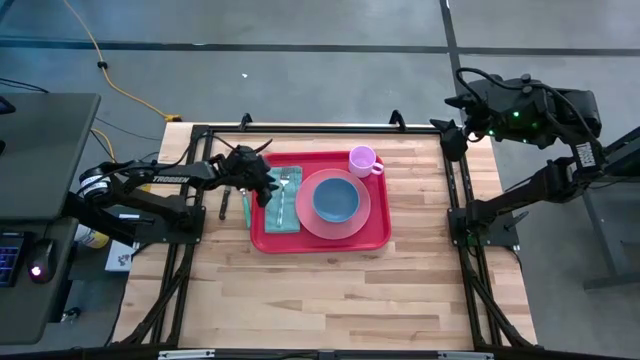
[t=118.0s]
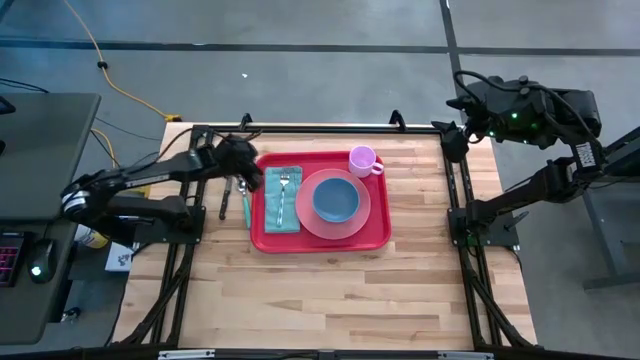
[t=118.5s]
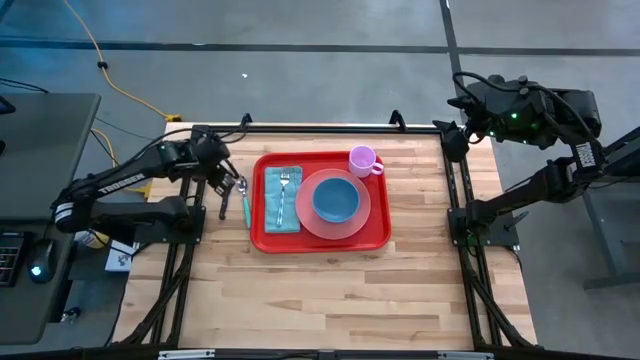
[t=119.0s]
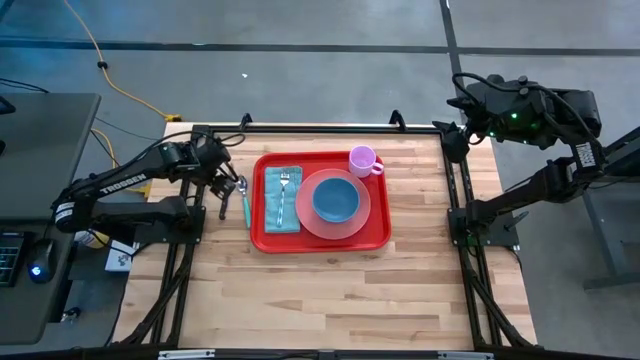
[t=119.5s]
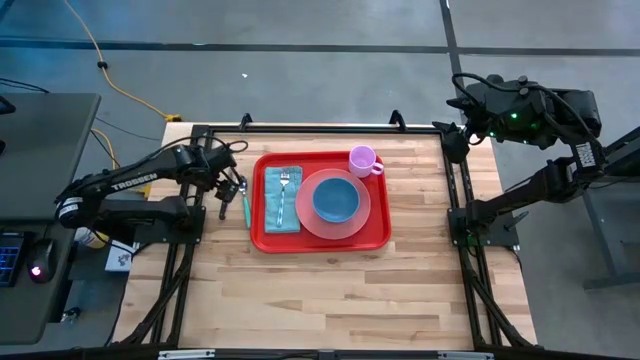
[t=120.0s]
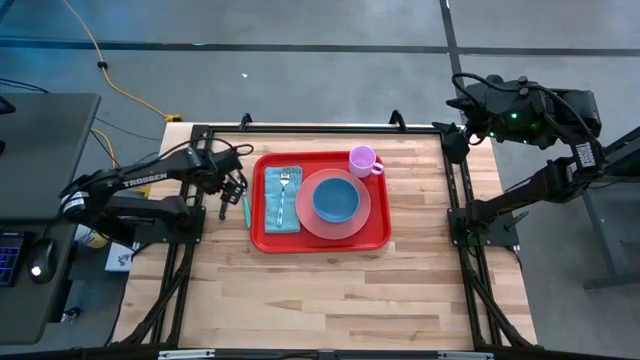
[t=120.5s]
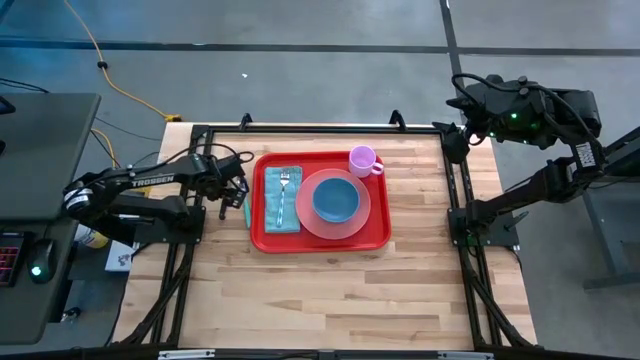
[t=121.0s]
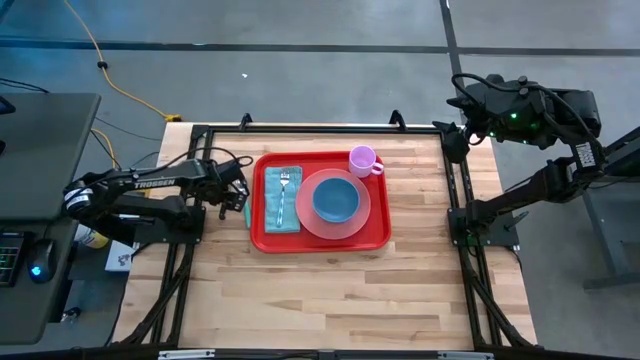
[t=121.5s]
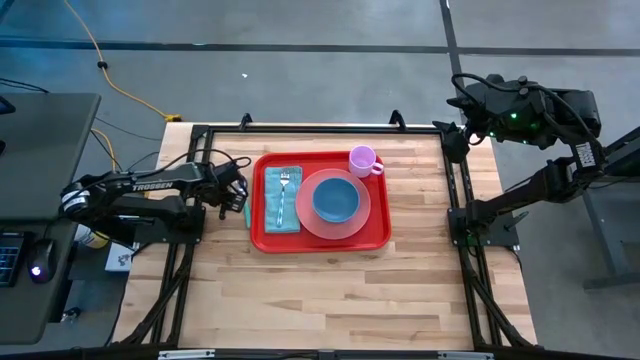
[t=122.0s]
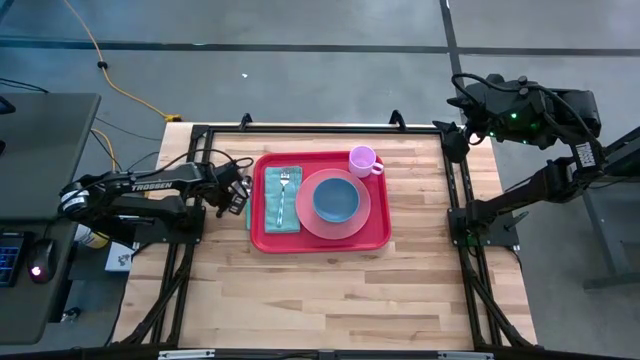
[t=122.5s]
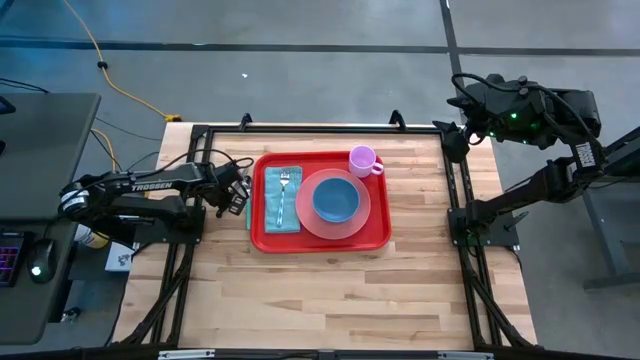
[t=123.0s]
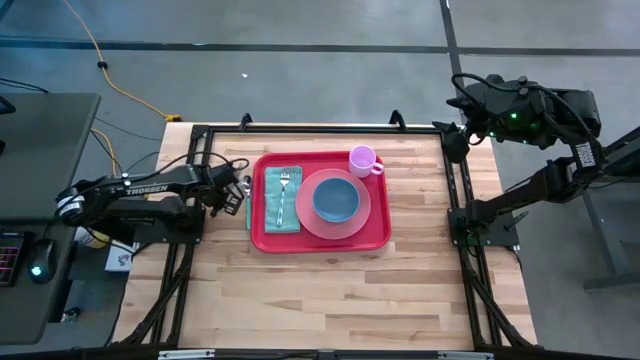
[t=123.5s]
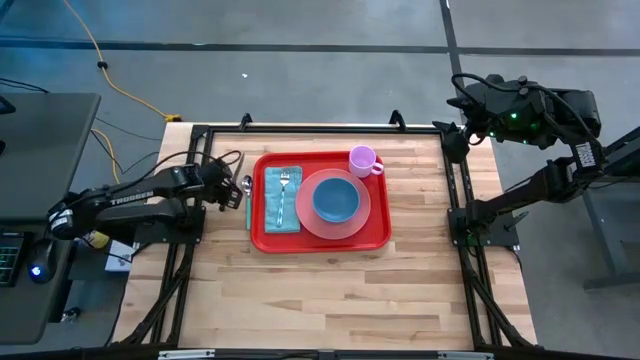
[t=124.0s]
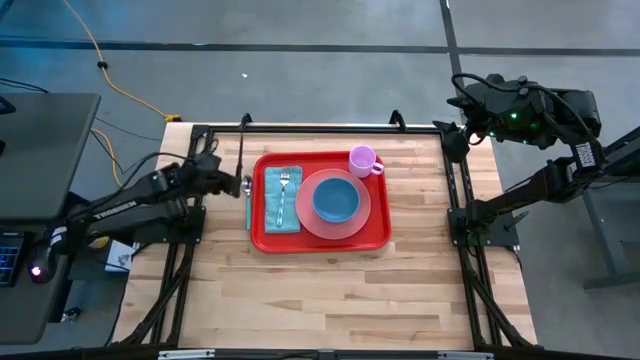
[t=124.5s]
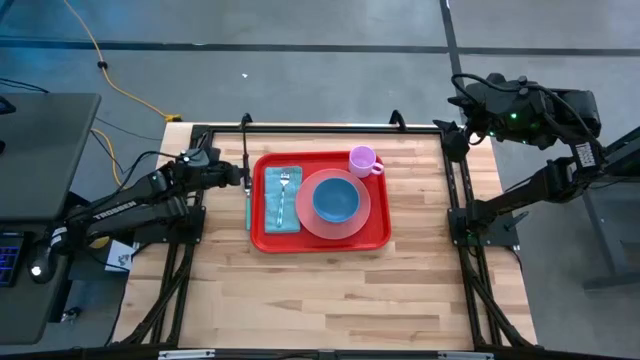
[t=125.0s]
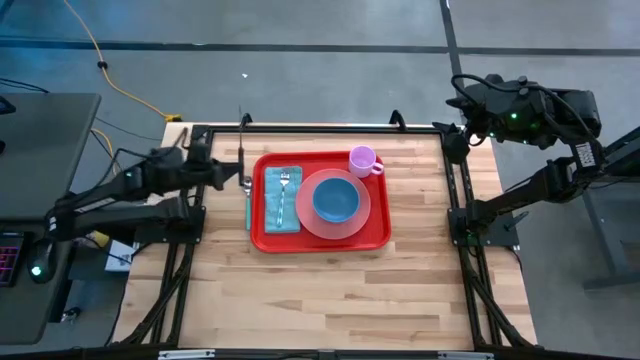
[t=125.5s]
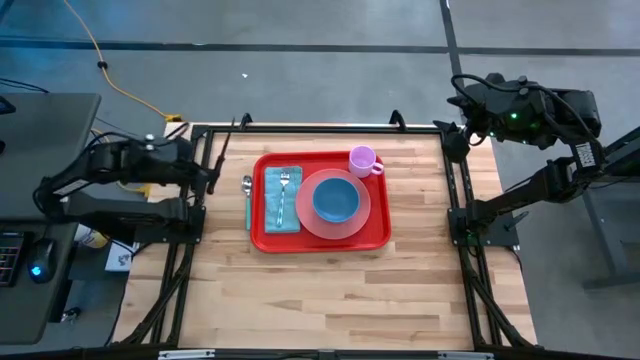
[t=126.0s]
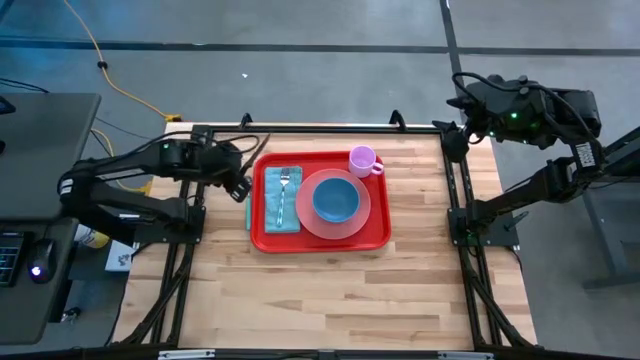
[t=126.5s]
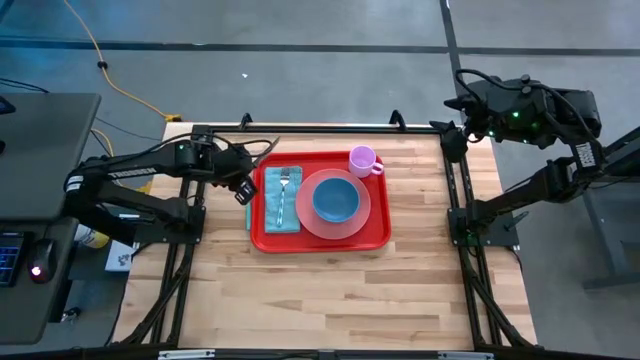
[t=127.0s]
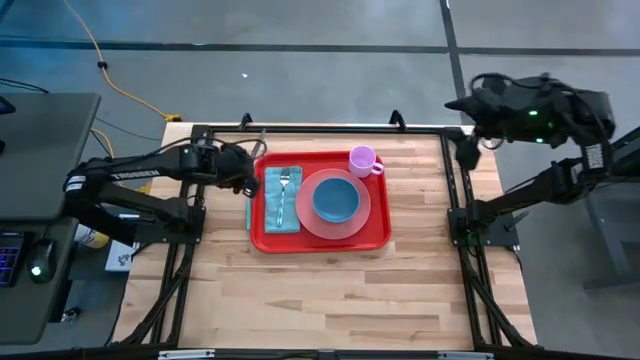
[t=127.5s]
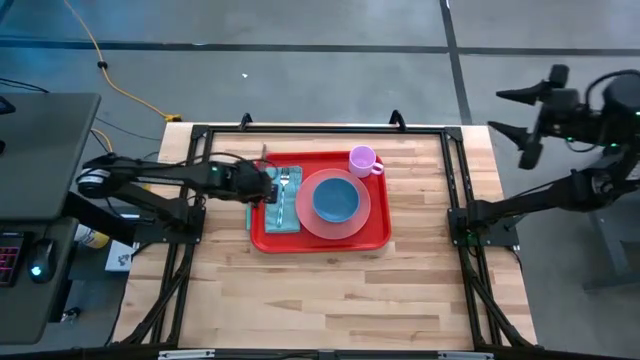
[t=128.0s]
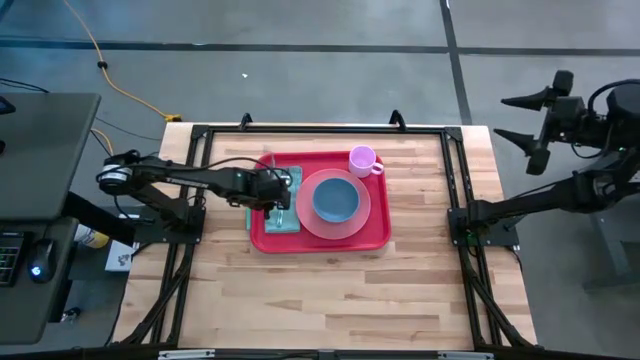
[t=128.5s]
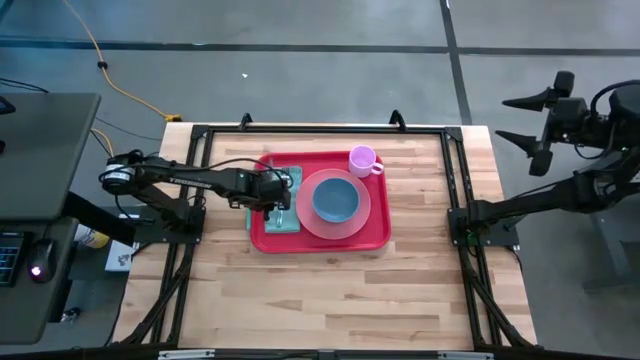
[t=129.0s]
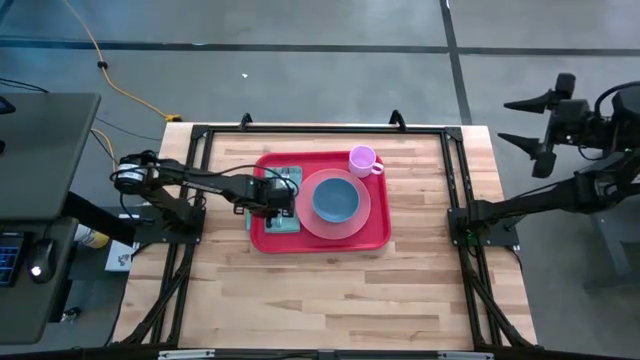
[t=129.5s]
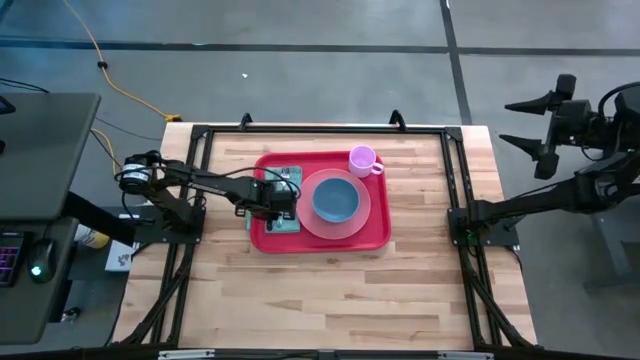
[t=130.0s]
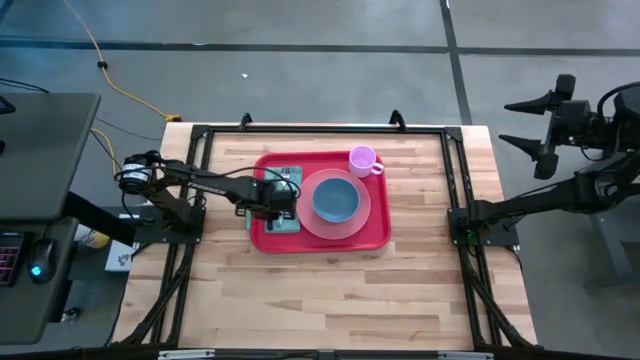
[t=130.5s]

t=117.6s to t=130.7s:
Task: Set up tray
Put the knife on the blue towel on the tray

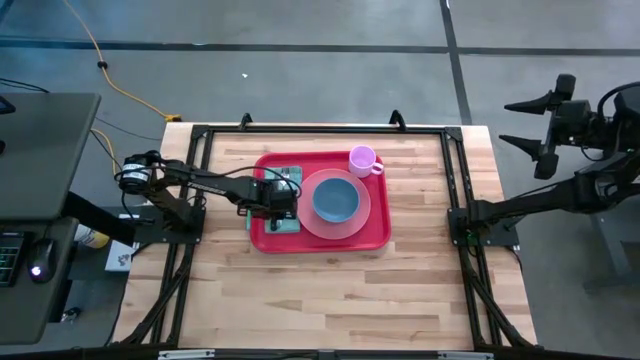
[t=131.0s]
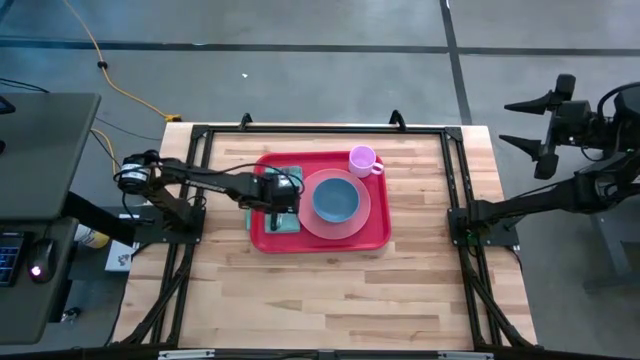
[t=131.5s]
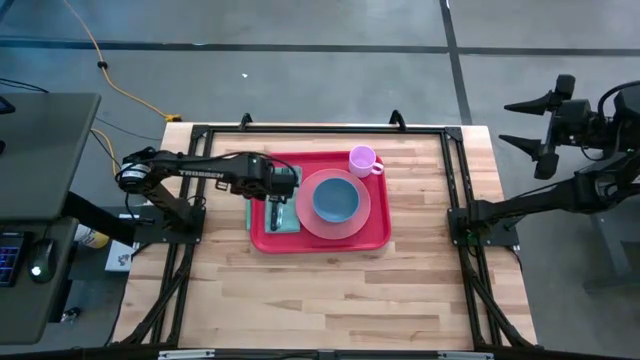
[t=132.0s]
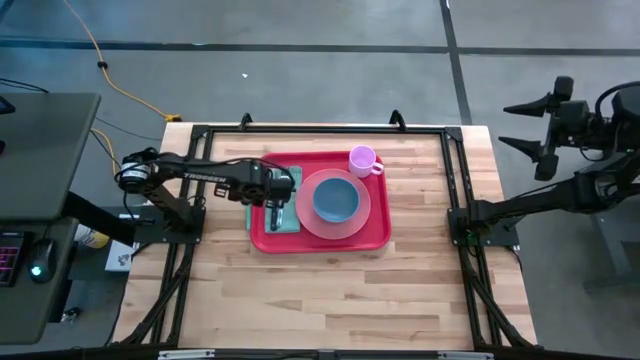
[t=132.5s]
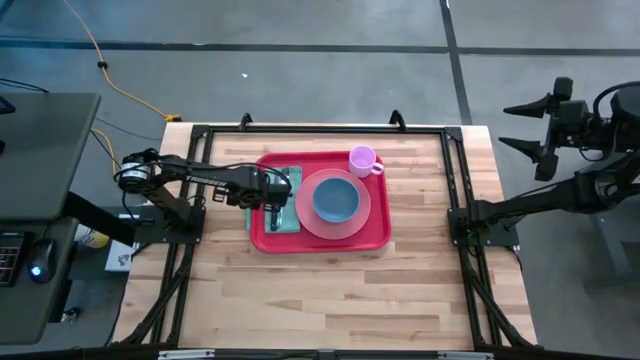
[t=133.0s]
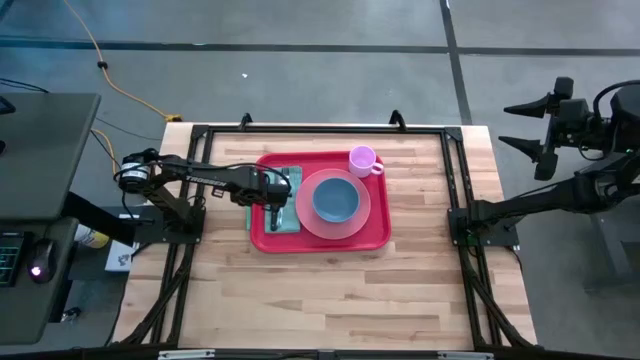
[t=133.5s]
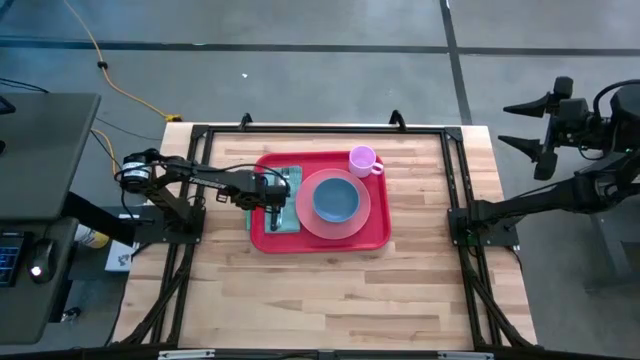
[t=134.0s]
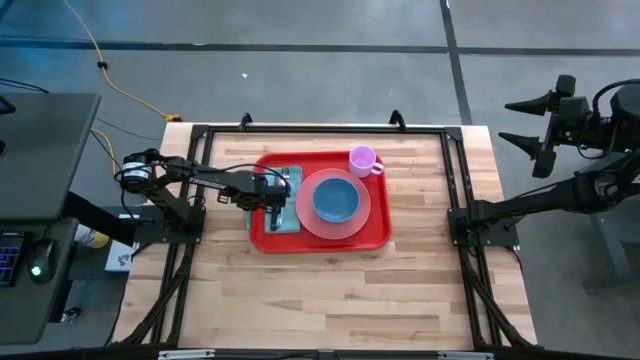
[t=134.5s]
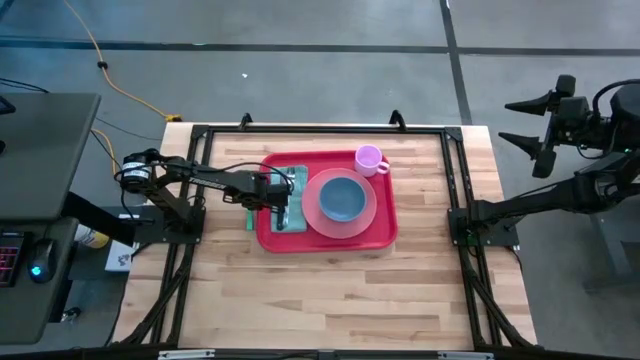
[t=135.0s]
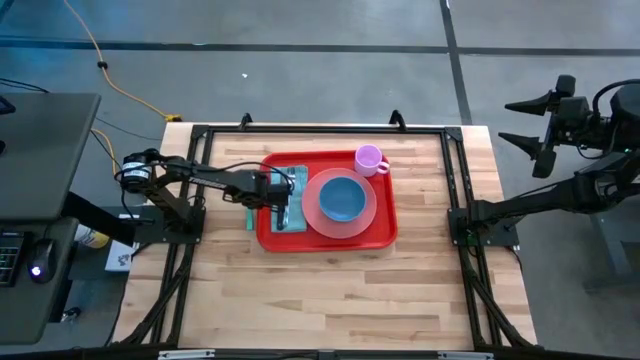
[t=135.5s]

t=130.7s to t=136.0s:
Adjust the tray

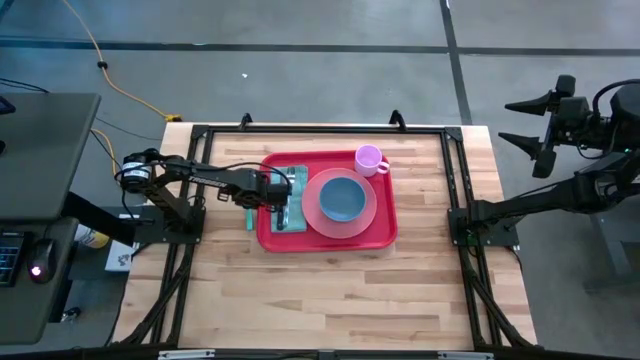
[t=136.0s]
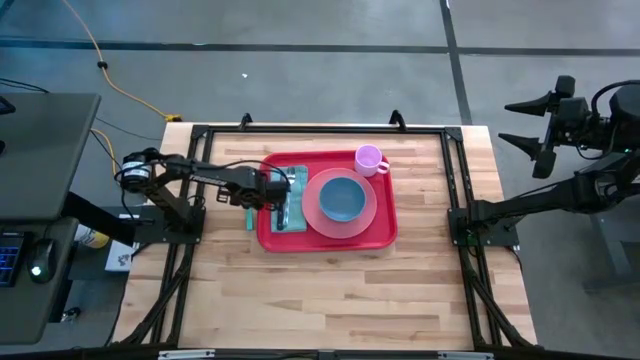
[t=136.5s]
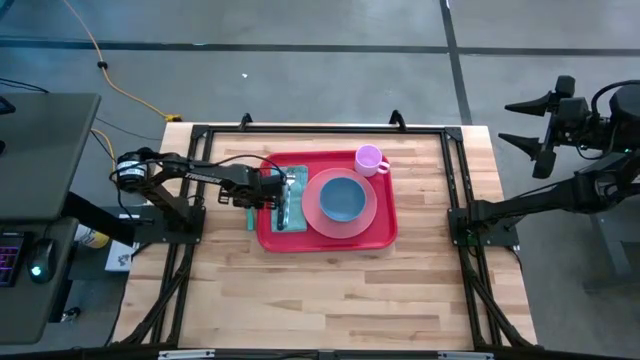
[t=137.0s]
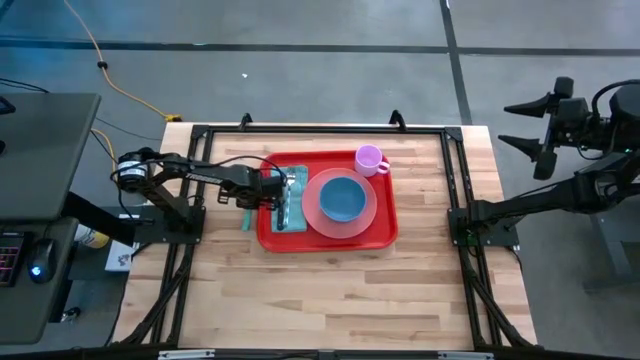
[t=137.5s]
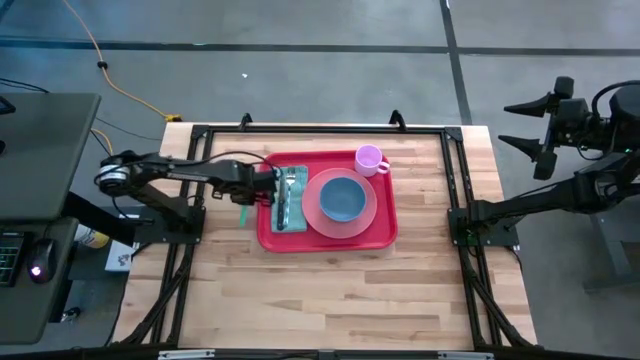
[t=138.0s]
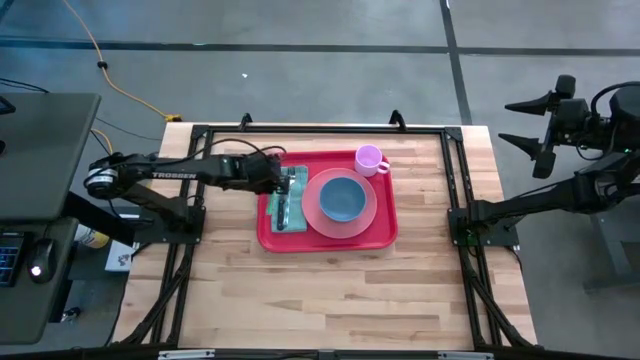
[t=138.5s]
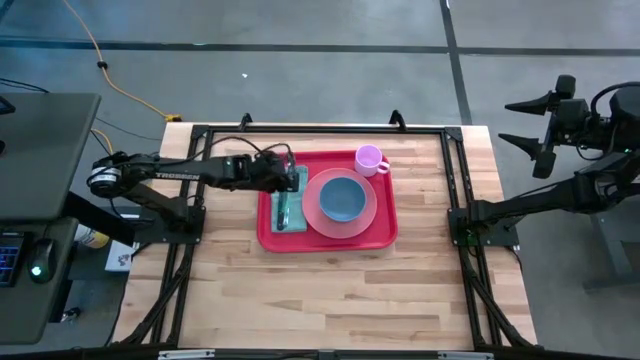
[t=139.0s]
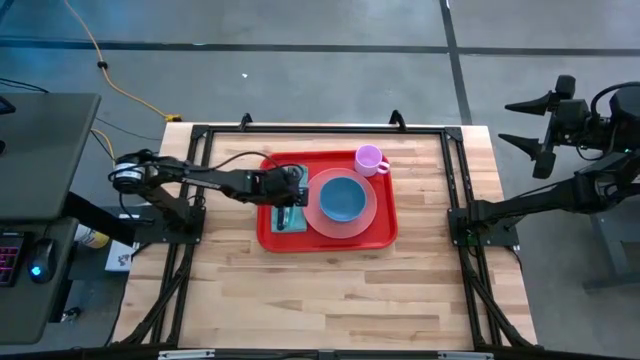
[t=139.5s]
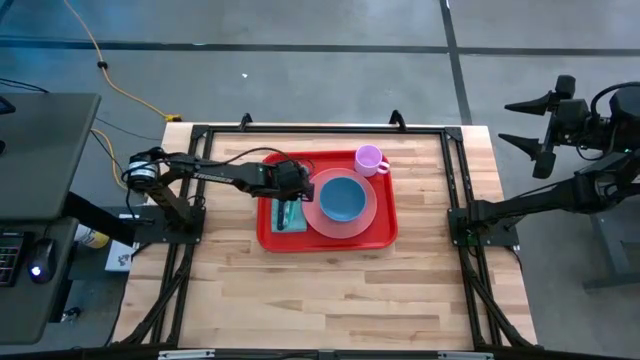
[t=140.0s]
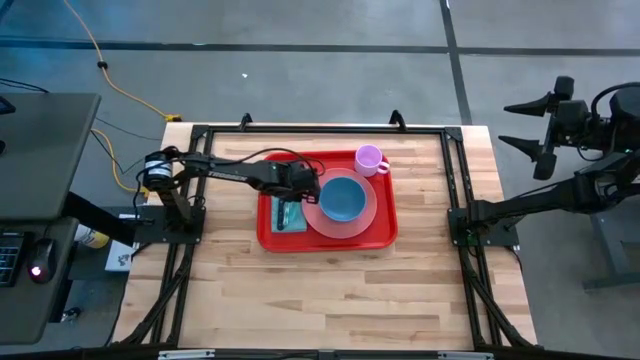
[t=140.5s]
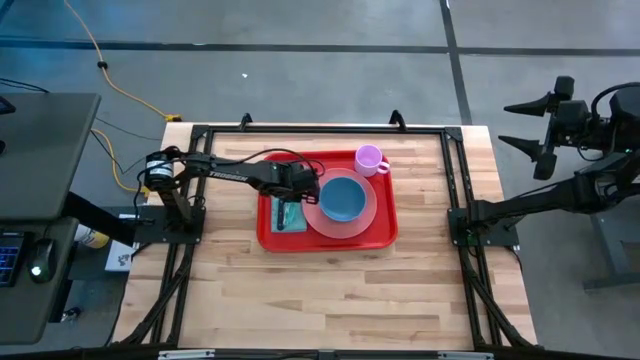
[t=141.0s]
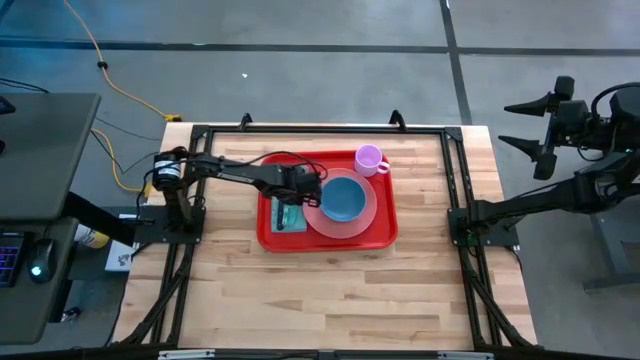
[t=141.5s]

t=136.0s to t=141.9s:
Put the spoon on the blue towel on the tray
